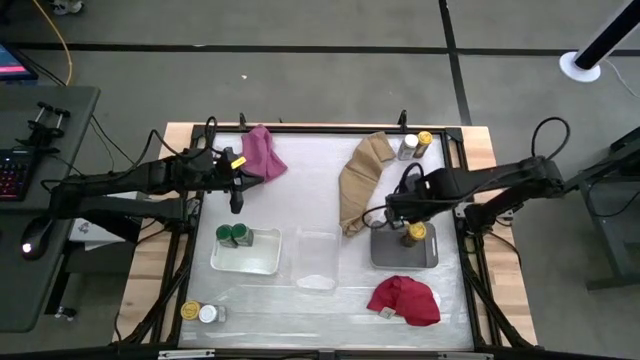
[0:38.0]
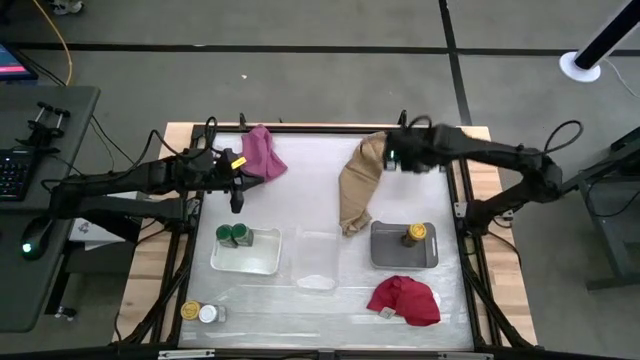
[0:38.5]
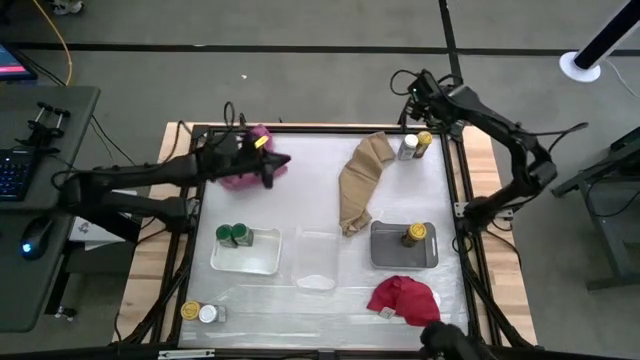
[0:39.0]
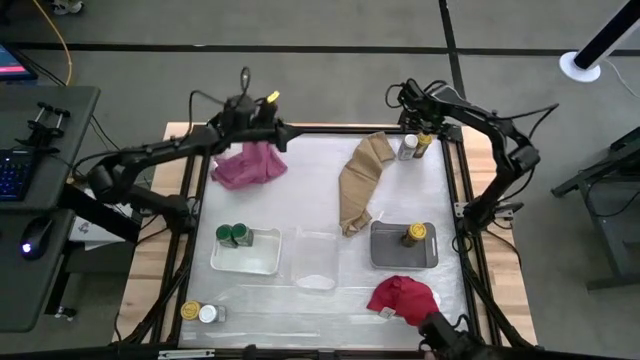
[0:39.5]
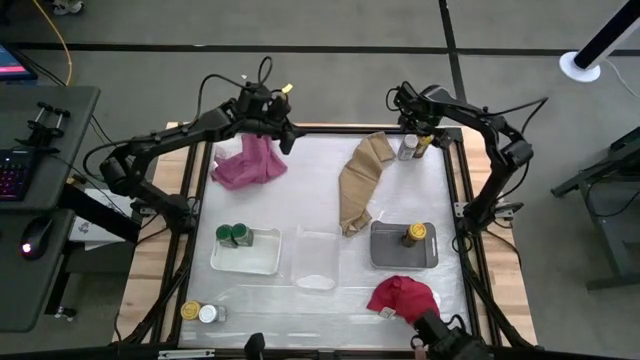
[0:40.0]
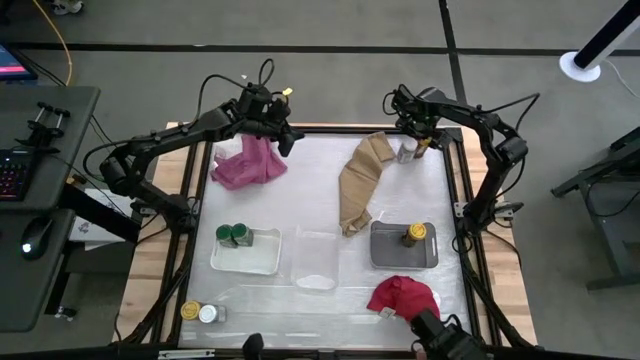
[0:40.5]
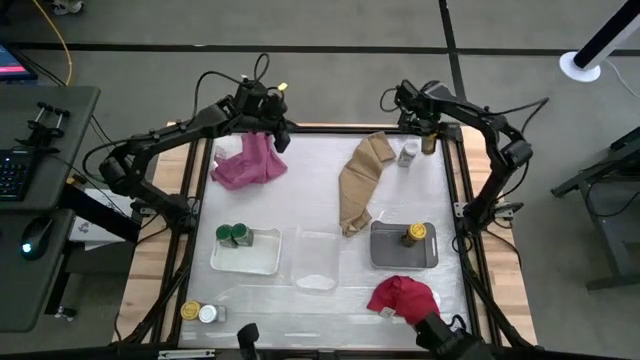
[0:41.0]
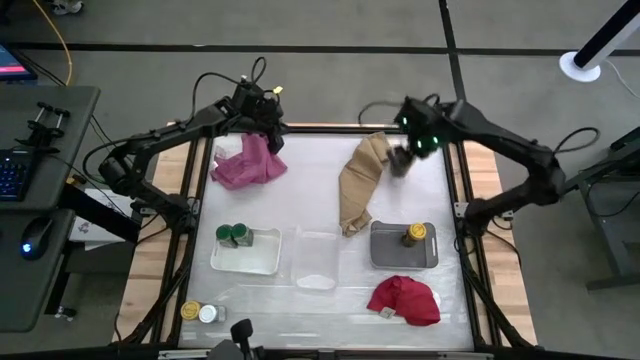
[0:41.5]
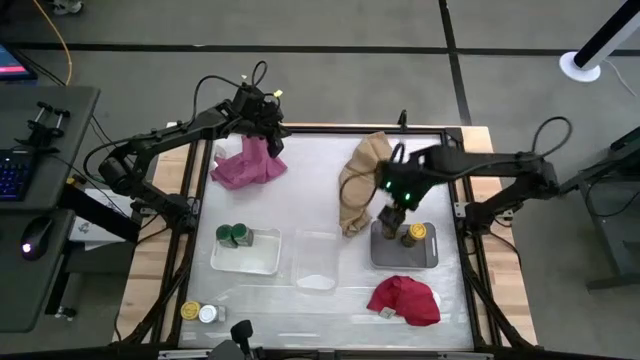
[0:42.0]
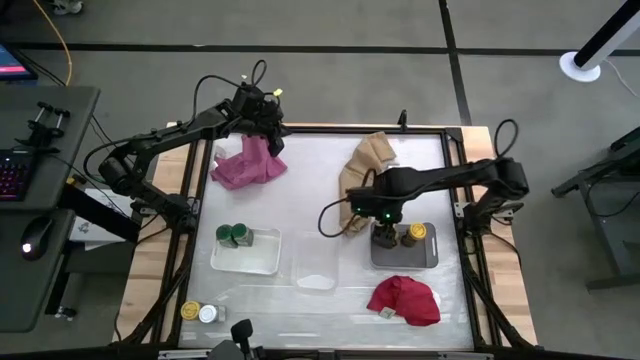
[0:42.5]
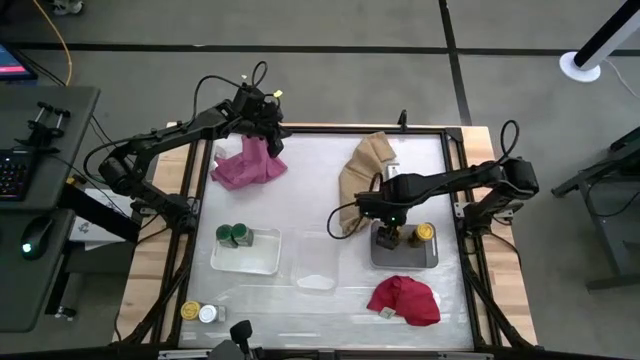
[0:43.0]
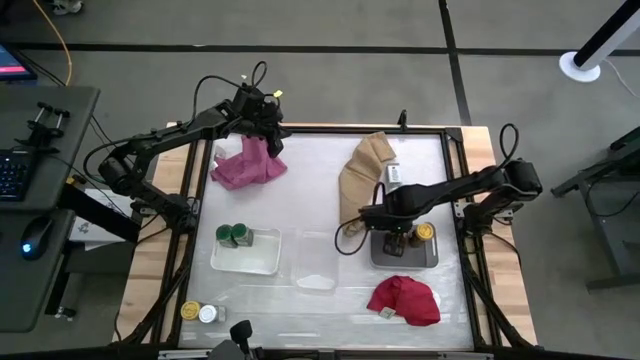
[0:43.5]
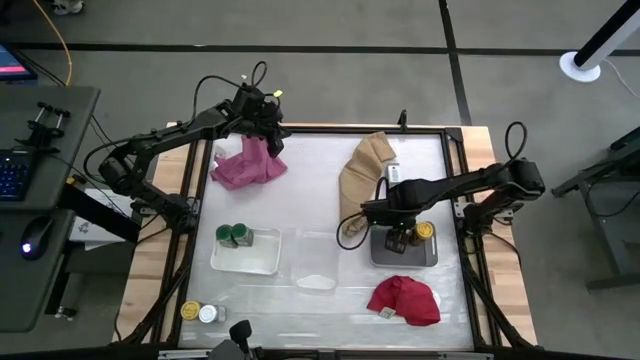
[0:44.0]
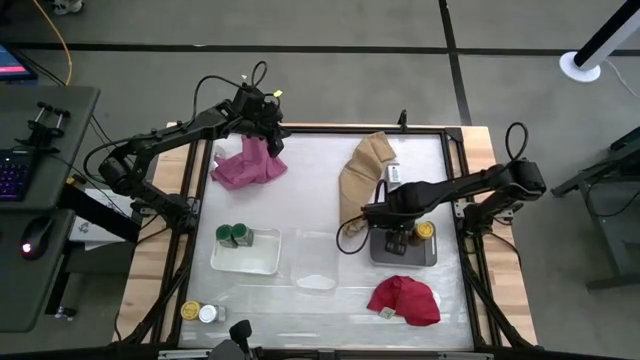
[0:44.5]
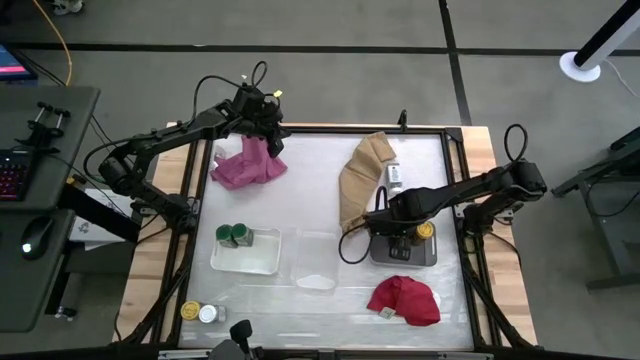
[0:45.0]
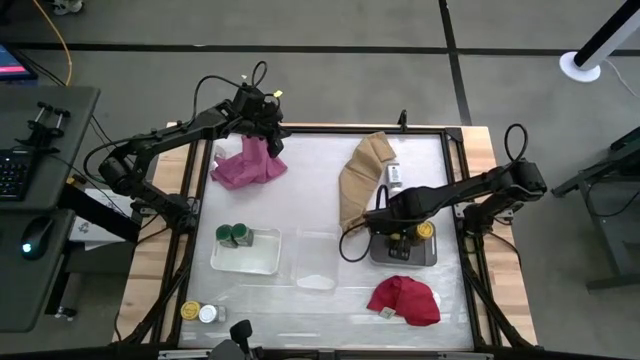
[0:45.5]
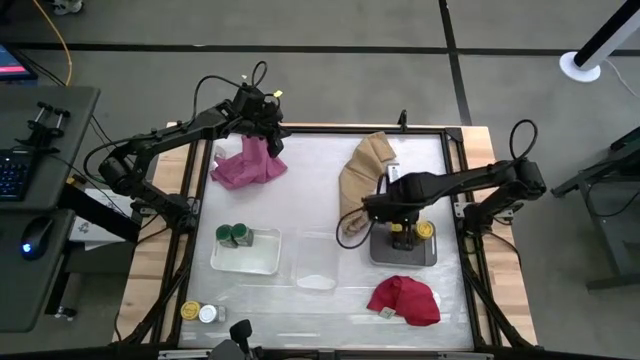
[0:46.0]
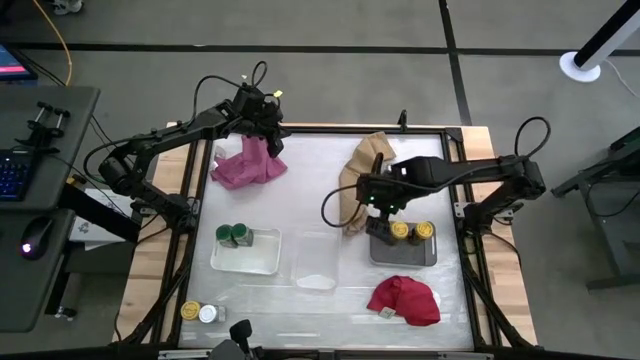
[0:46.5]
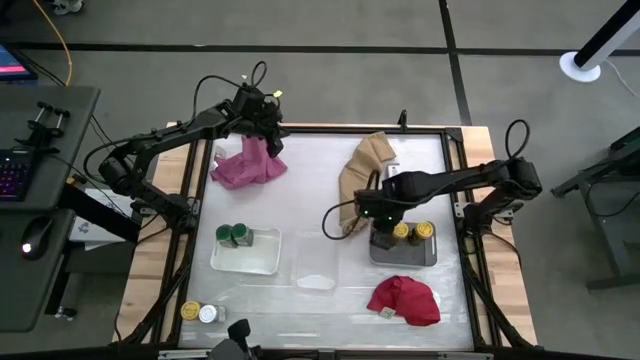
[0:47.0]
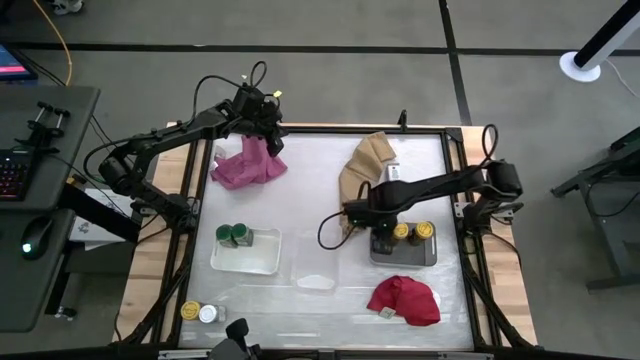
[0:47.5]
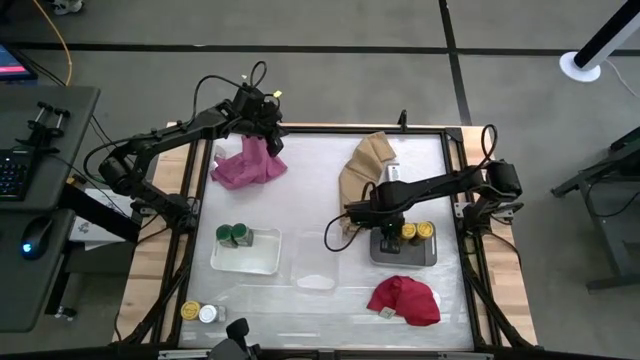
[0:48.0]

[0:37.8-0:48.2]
Task: Sort spices by type
Put the right yellow seasoning bottle into the black bin

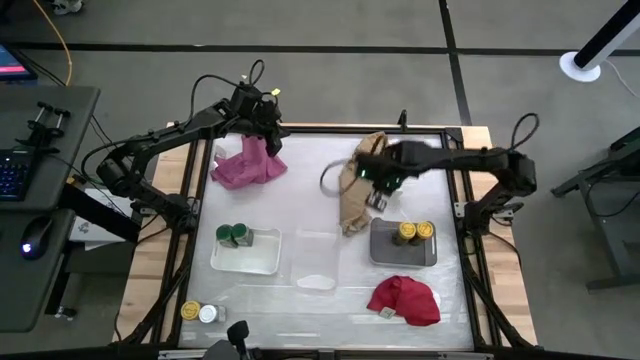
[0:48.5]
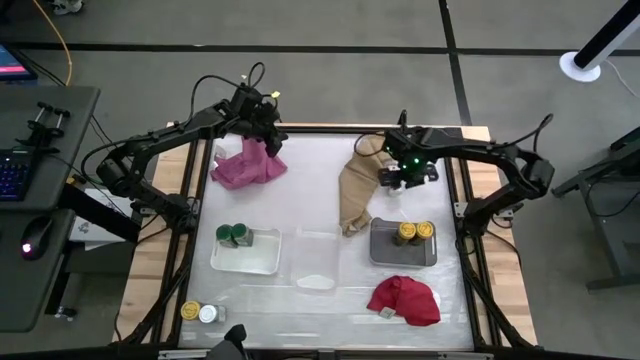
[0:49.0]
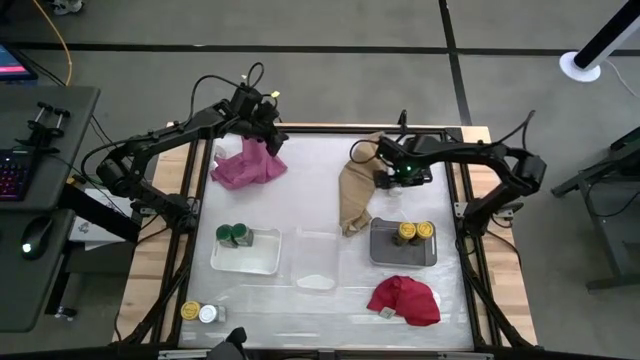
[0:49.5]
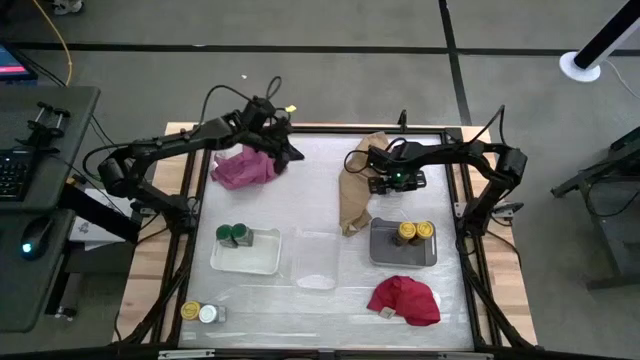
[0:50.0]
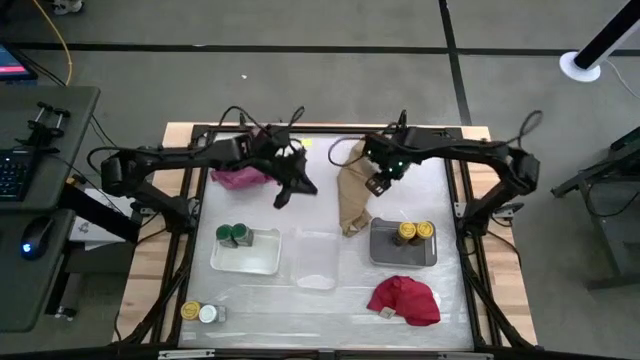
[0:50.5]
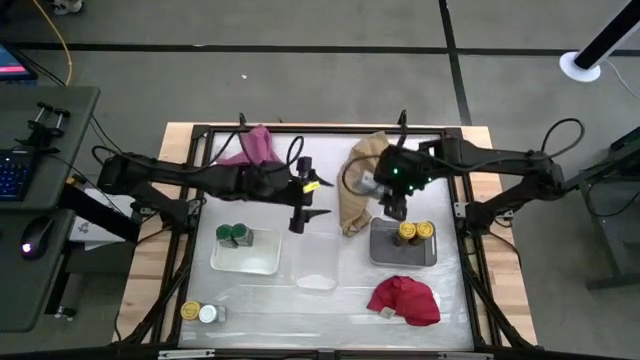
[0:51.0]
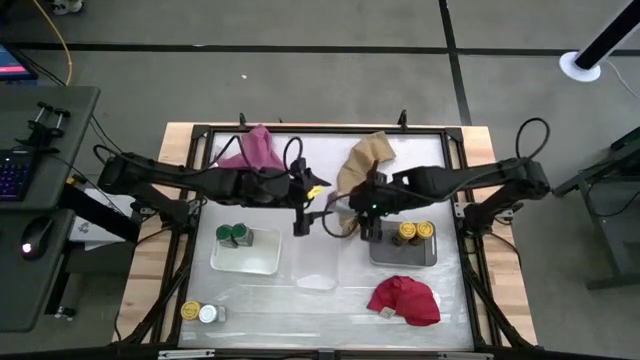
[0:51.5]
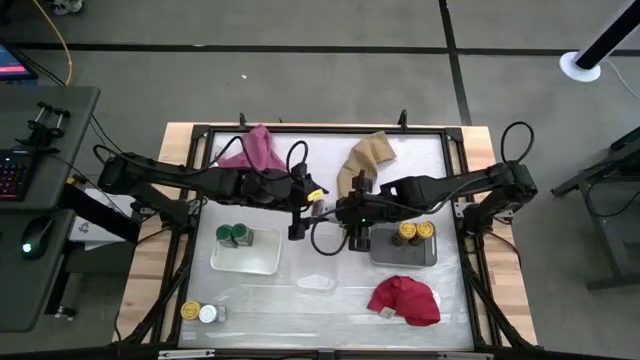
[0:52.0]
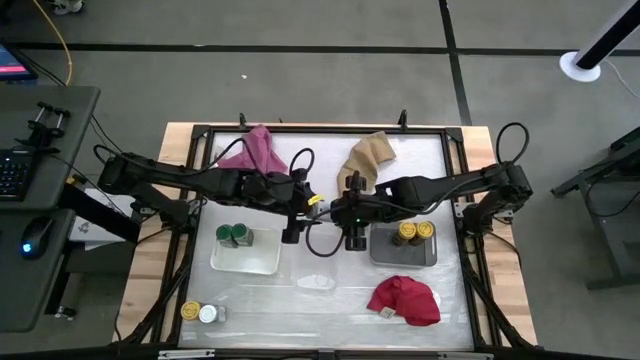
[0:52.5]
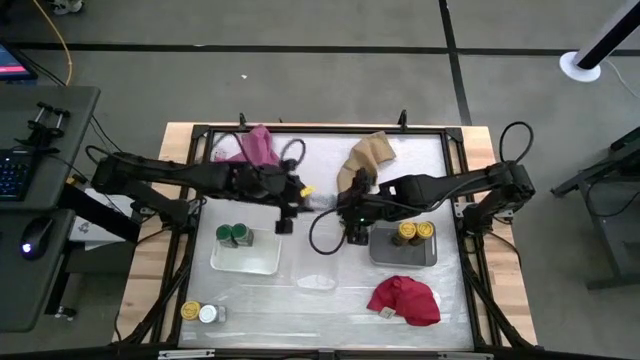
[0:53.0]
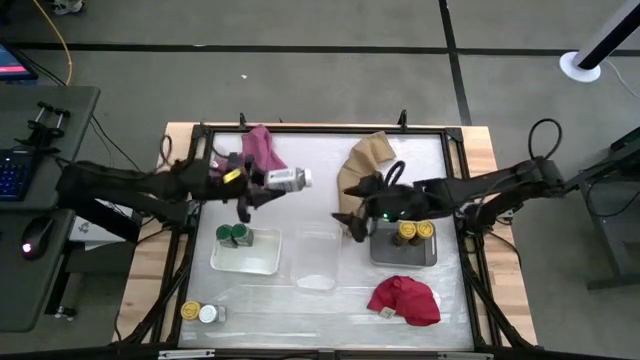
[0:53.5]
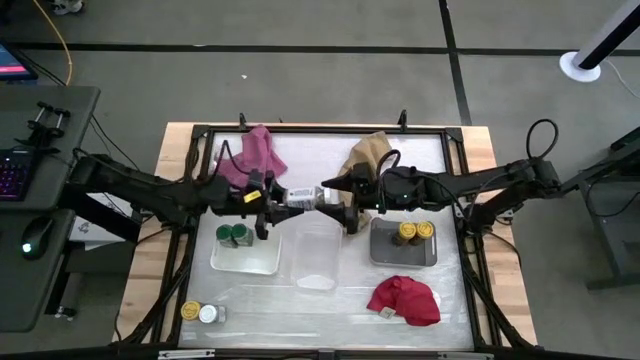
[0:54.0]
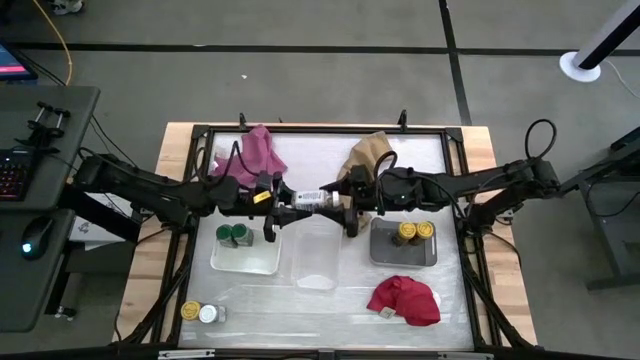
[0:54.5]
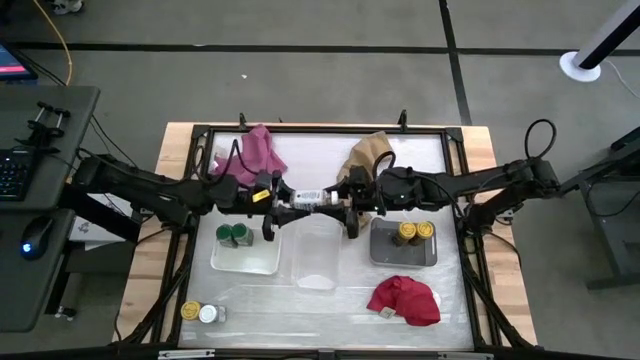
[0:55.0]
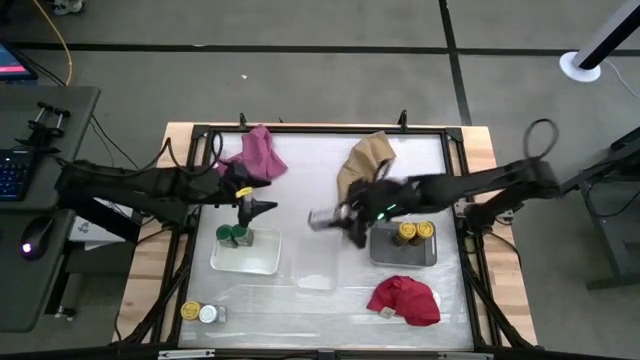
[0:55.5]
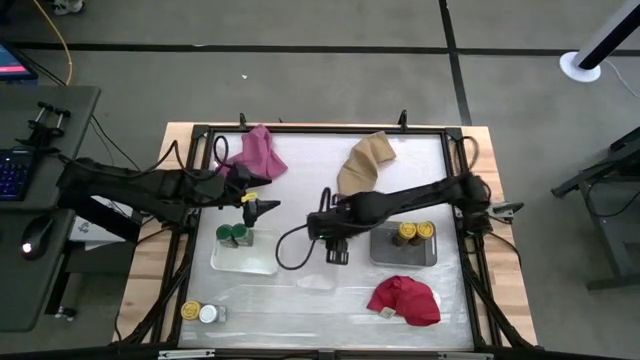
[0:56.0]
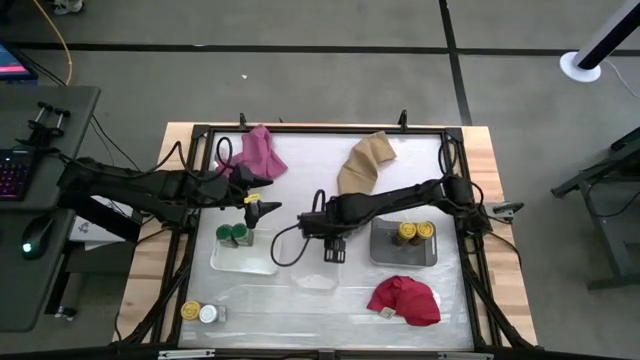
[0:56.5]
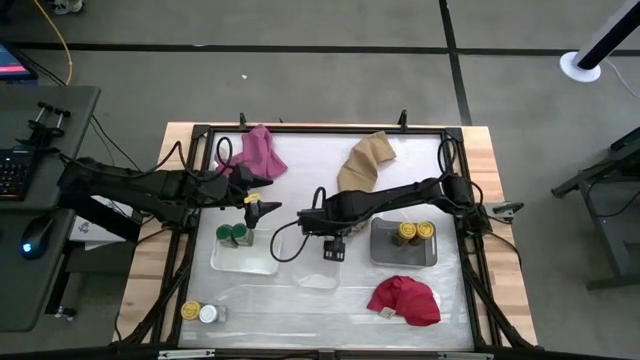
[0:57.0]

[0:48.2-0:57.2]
Put the right white seasoning bottle into the transparent bin

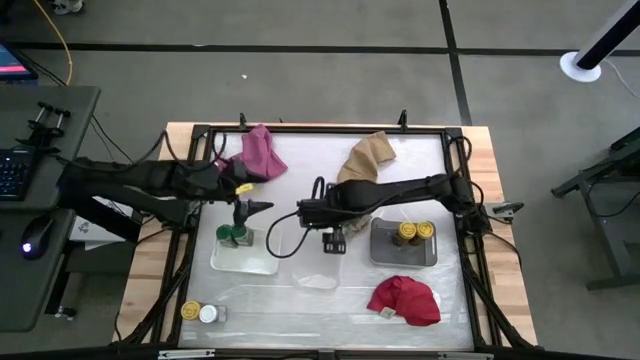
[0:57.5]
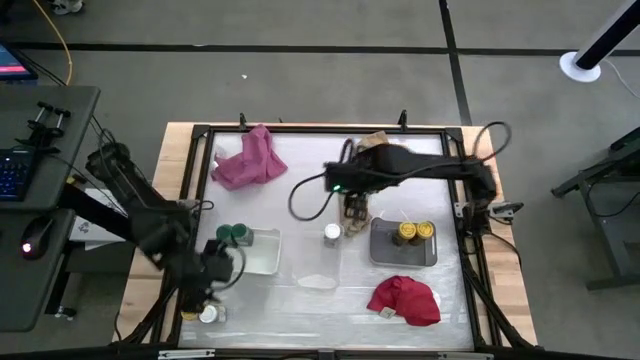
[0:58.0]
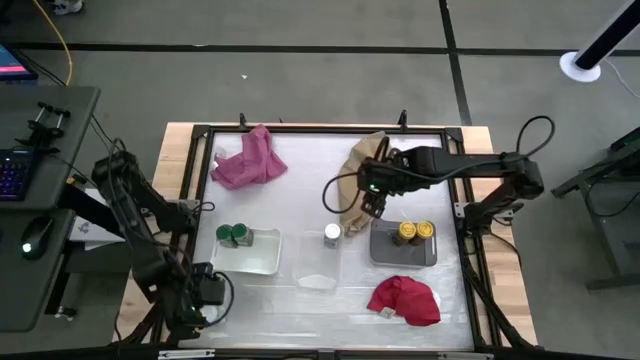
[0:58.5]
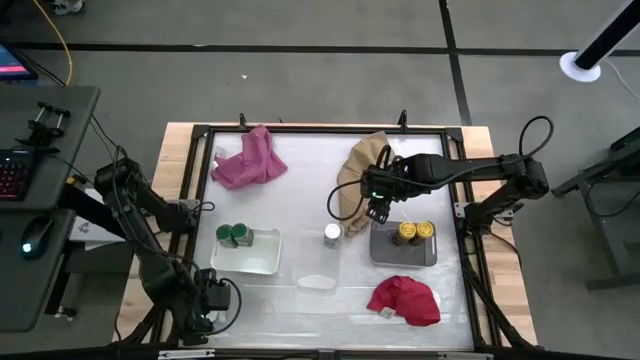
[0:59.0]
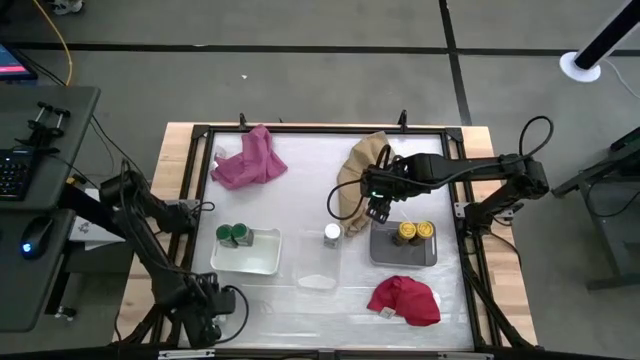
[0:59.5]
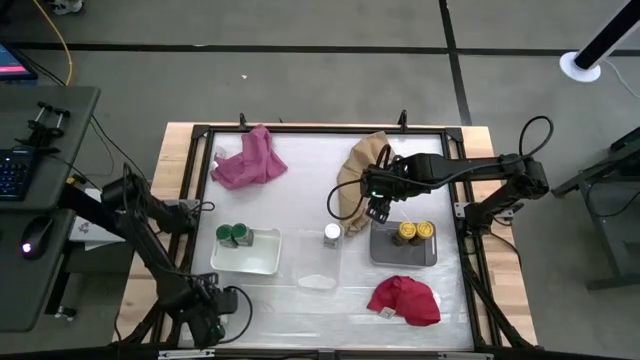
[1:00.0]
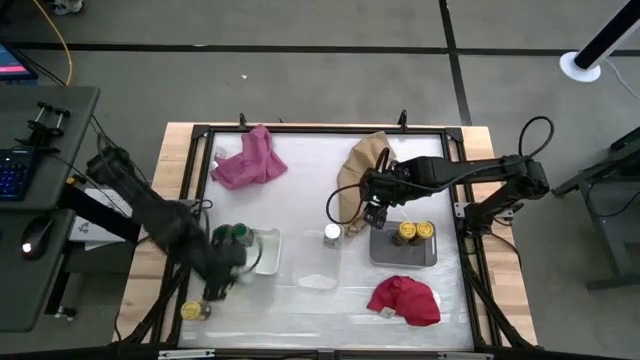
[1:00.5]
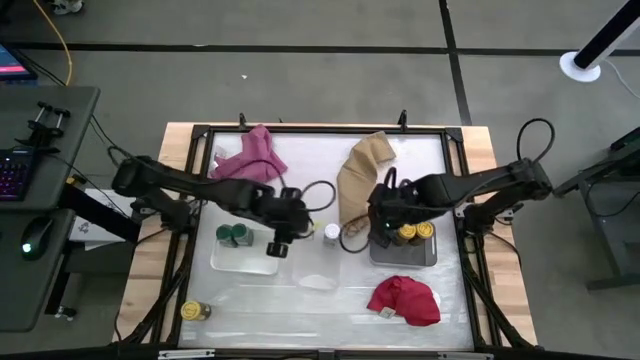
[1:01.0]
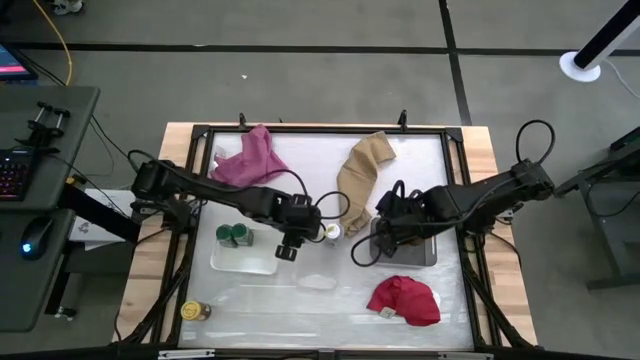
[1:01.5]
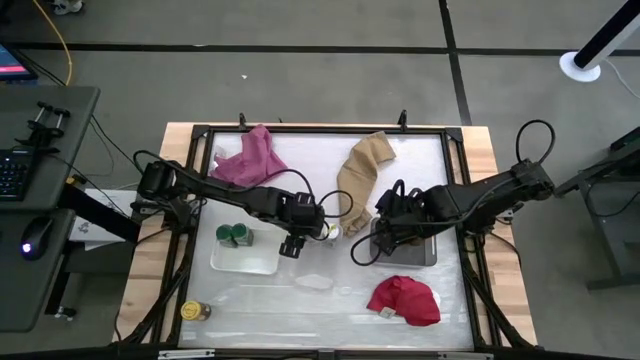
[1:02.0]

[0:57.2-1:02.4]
Put the white seasoning bottle into the transparent bin
